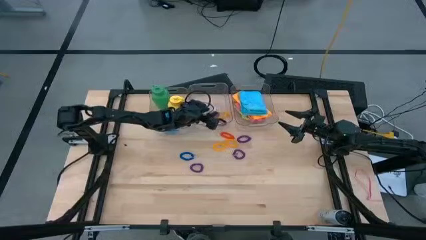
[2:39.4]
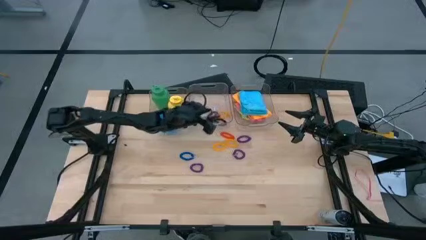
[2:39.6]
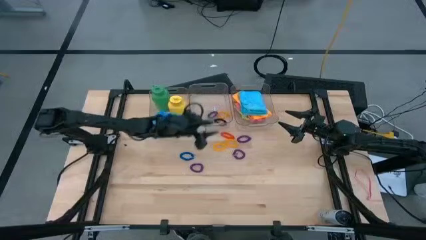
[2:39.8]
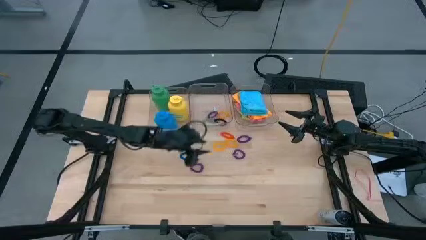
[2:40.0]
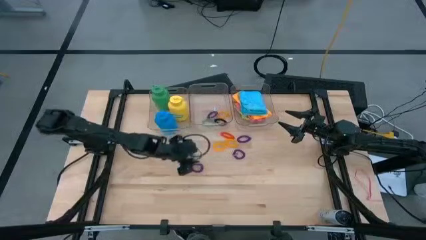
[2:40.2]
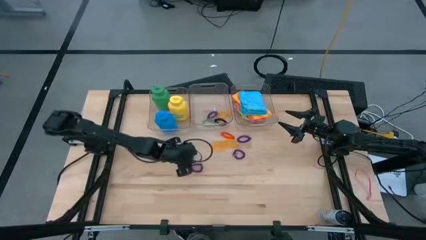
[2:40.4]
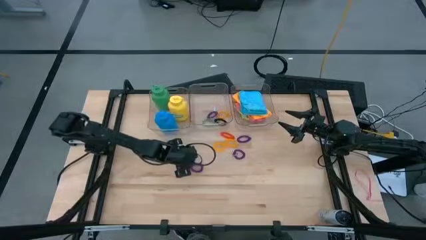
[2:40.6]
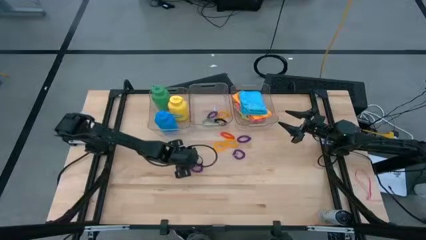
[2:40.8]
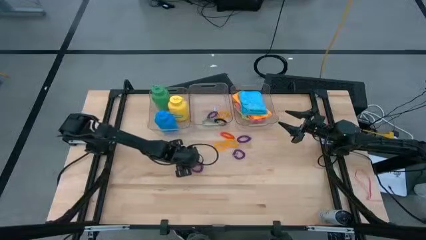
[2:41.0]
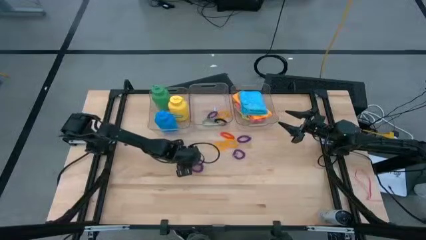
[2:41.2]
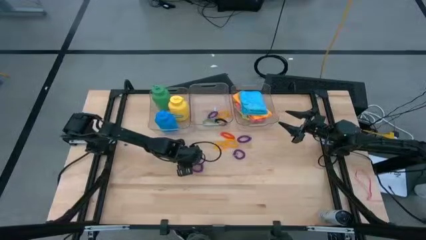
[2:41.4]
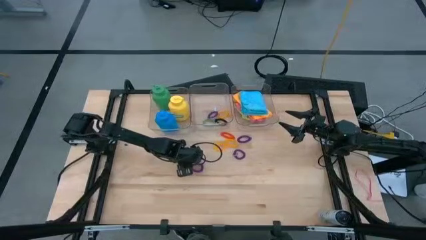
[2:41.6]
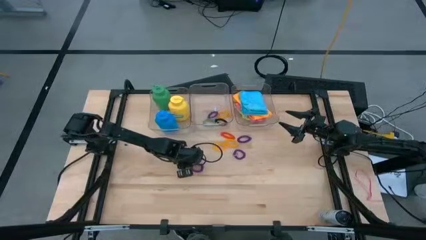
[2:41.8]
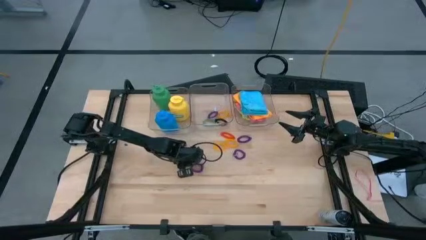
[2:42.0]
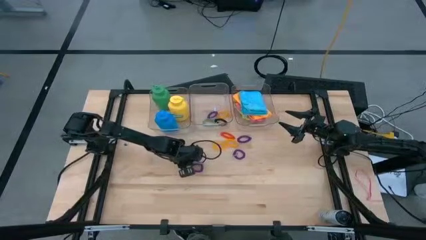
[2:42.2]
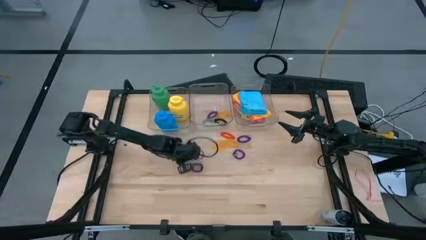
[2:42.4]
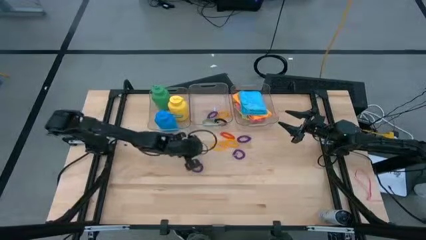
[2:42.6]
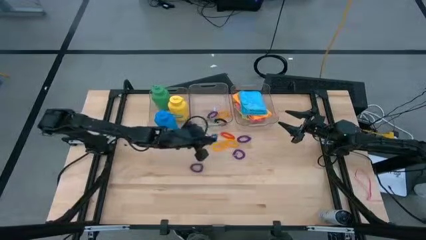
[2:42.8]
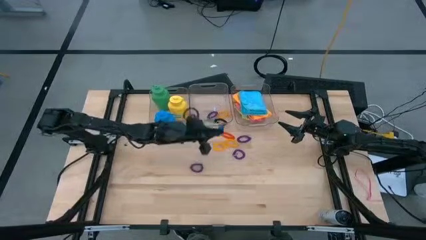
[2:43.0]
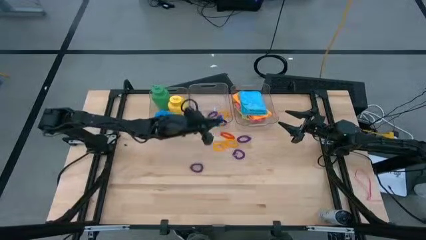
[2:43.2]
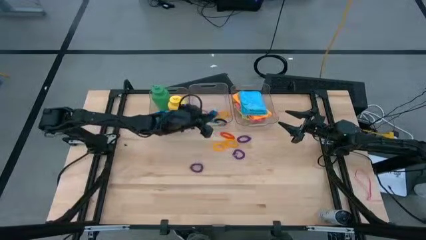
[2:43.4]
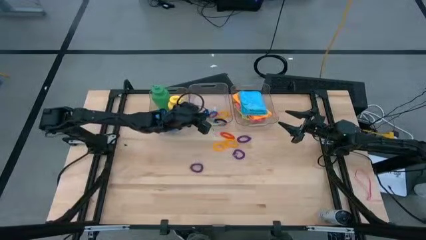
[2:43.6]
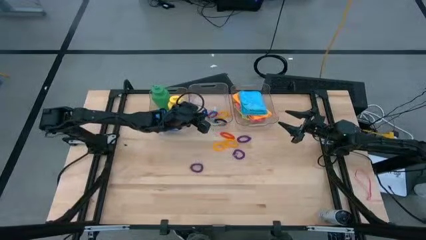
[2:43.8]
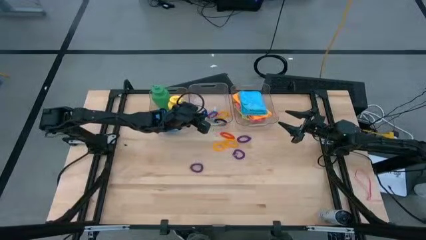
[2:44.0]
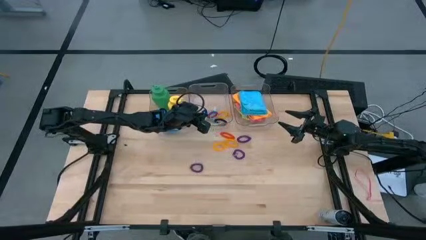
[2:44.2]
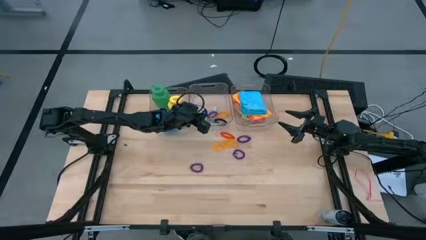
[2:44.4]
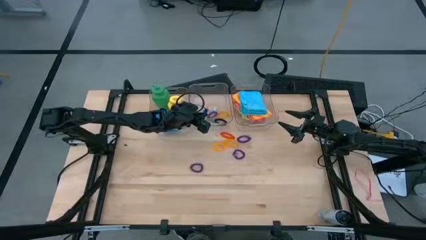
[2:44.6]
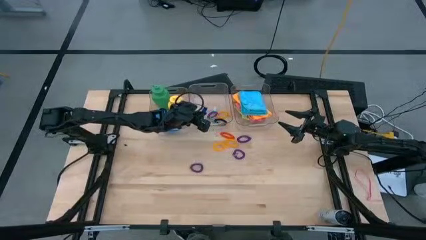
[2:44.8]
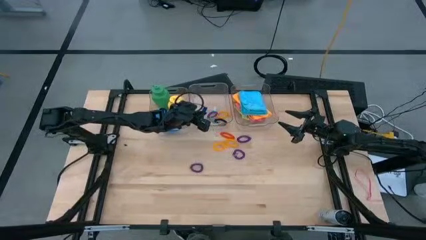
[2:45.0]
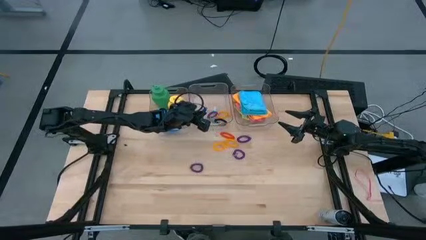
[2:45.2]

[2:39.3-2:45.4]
Task: Pick & Place Sports Items
Put the blue wrist coil into the middle transparent container

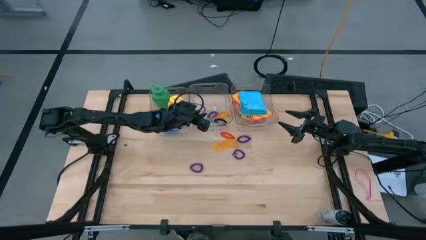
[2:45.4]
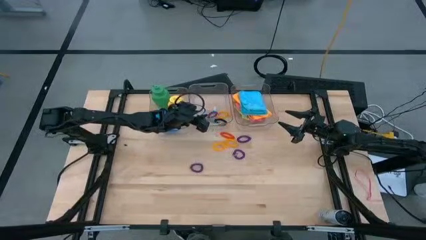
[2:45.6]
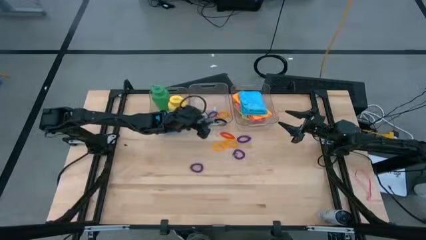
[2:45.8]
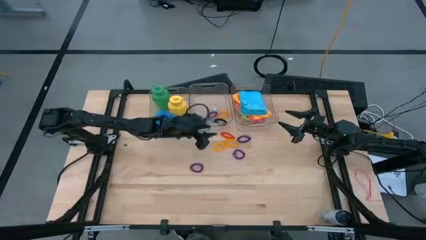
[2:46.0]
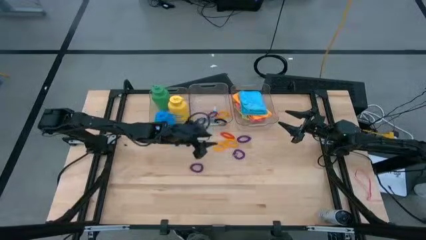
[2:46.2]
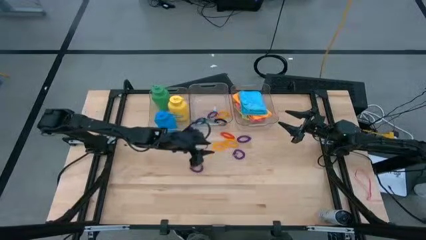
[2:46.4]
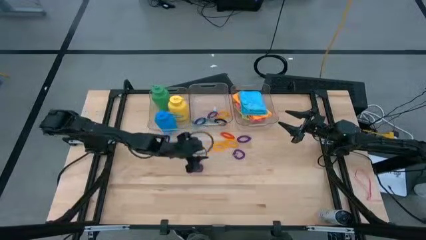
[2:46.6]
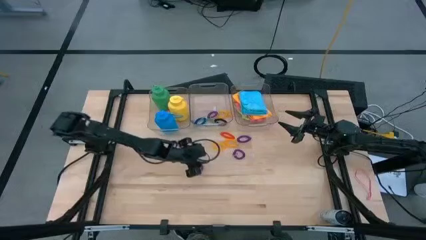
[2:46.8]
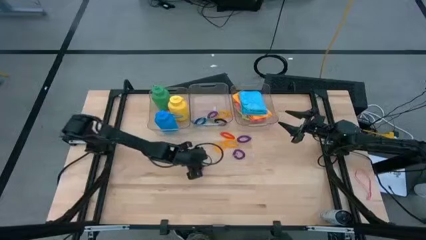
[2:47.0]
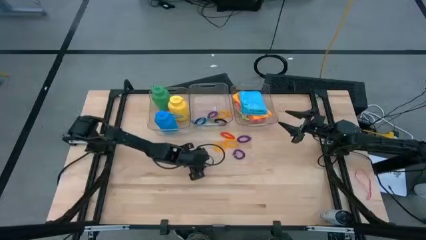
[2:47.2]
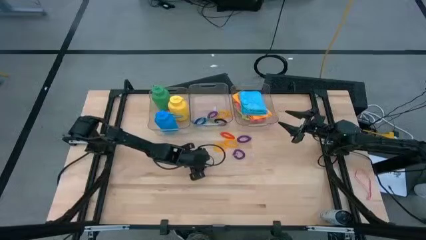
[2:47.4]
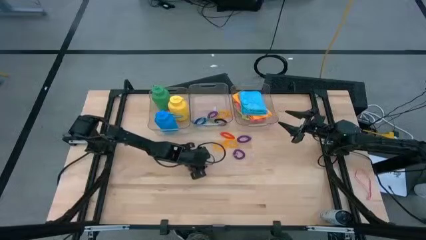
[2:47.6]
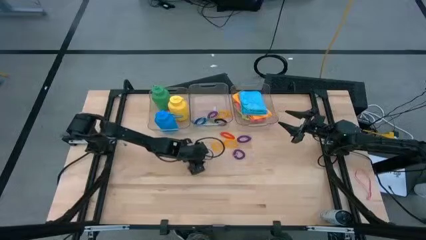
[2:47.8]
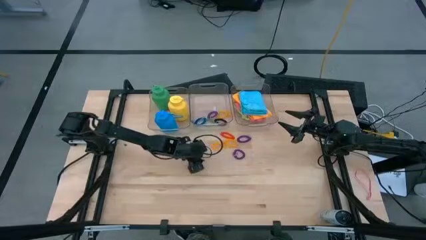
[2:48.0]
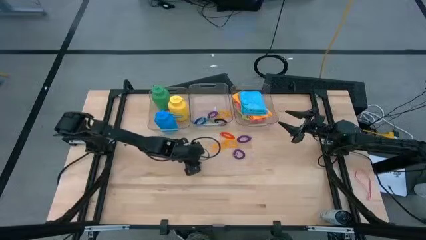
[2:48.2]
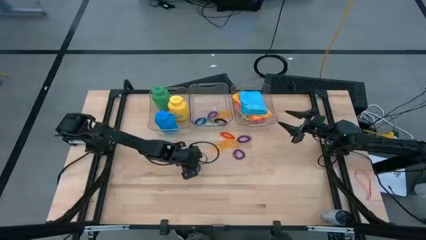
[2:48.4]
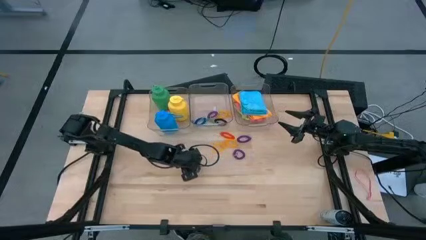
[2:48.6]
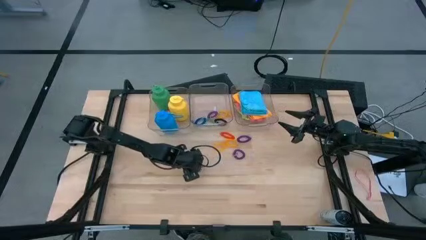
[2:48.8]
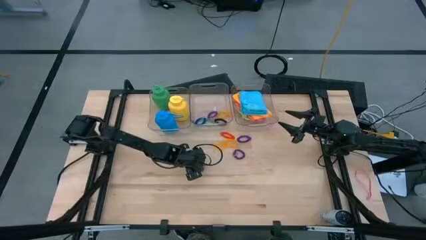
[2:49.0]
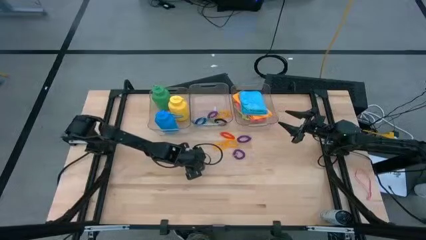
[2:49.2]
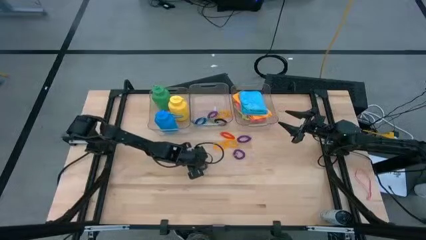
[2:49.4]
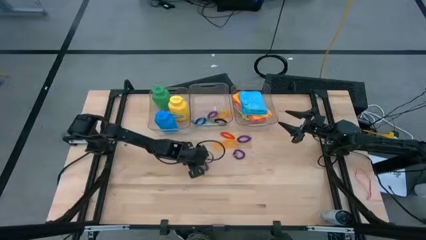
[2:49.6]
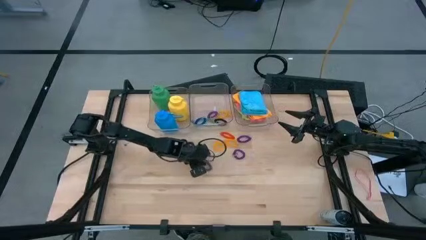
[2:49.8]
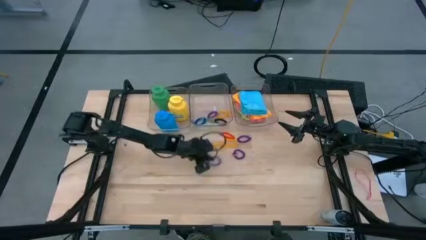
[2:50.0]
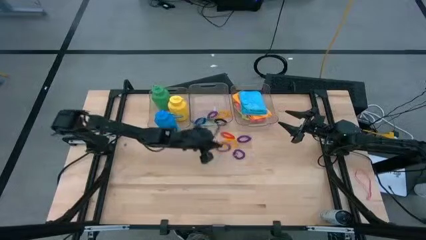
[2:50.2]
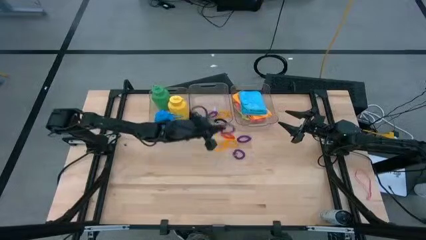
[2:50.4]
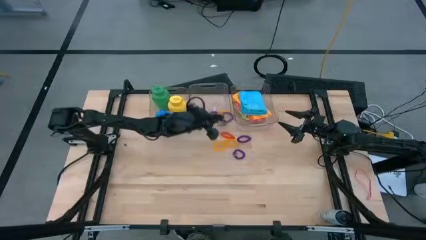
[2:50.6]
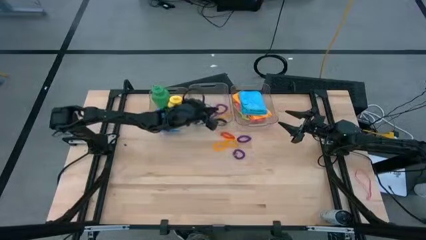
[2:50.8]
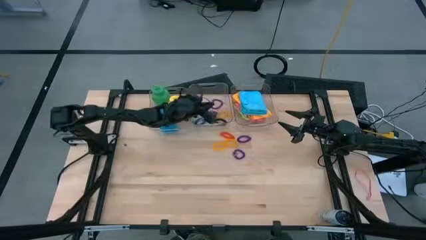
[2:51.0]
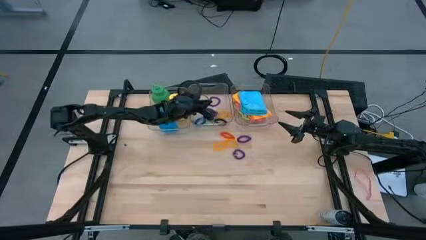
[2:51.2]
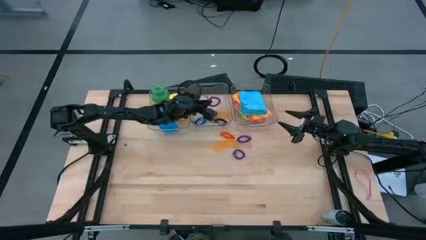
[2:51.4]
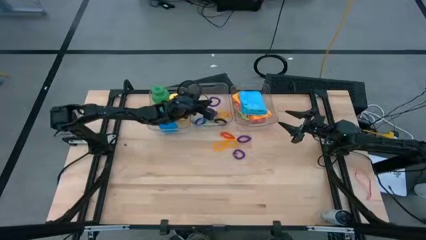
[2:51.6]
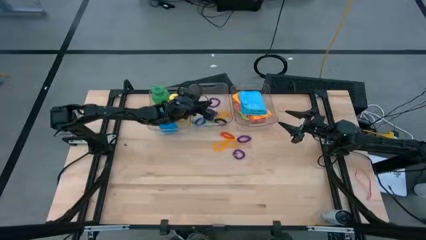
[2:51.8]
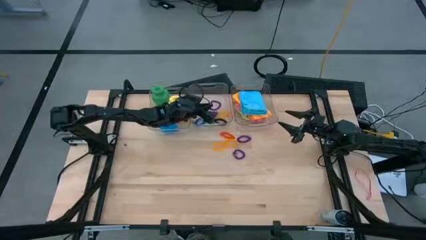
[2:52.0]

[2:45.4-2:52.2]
Put the purple wrist coil into the middle transparent container

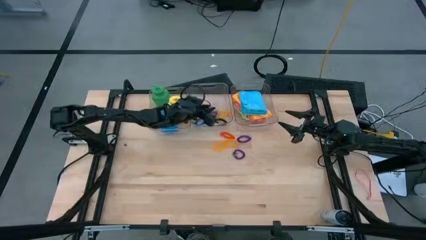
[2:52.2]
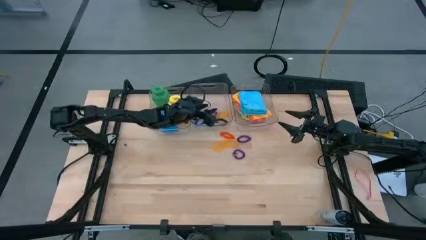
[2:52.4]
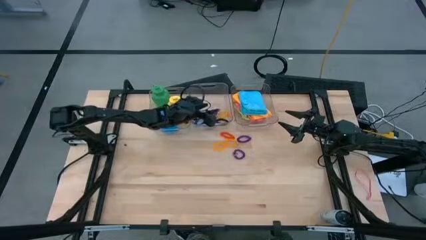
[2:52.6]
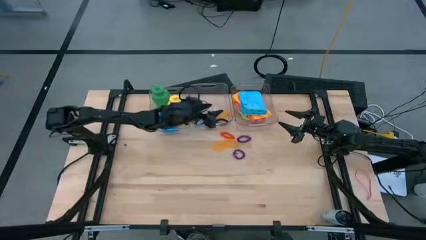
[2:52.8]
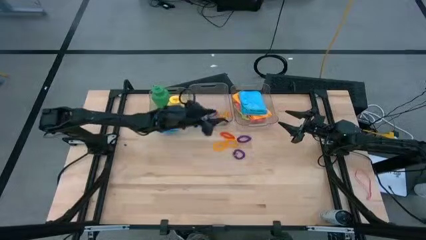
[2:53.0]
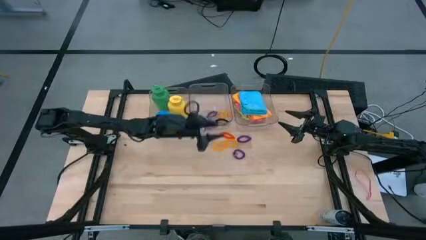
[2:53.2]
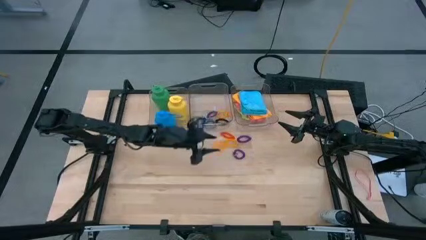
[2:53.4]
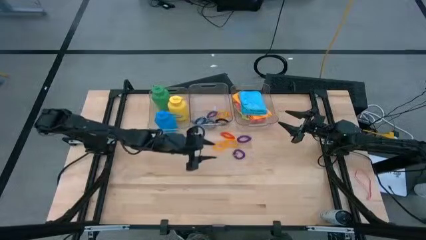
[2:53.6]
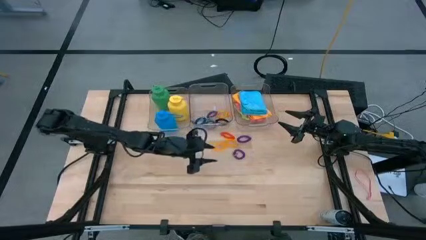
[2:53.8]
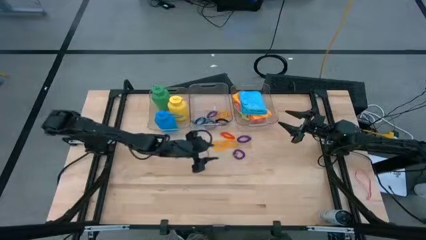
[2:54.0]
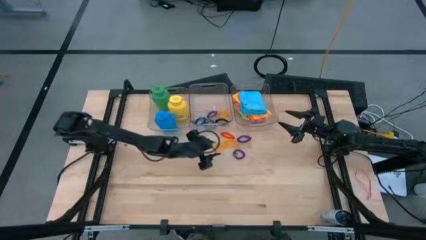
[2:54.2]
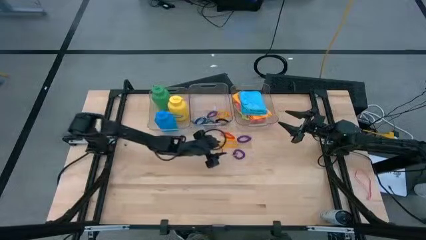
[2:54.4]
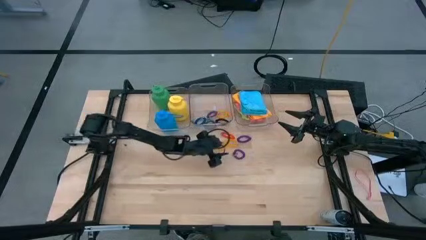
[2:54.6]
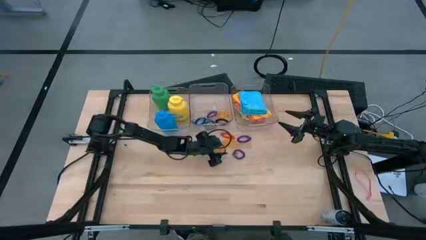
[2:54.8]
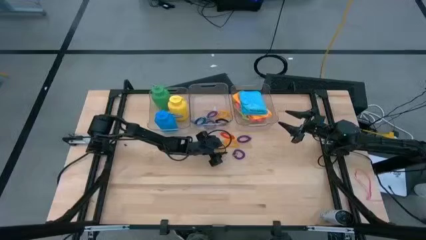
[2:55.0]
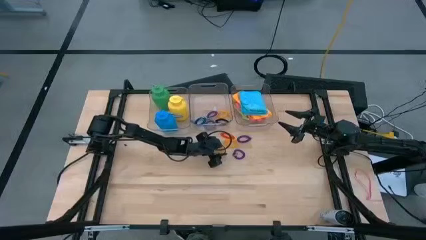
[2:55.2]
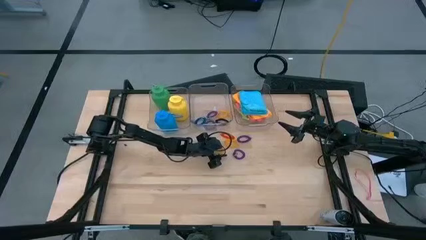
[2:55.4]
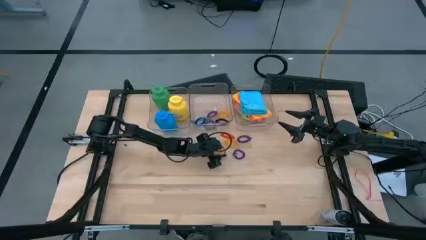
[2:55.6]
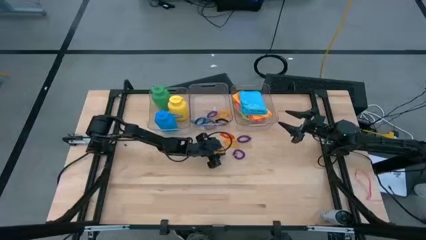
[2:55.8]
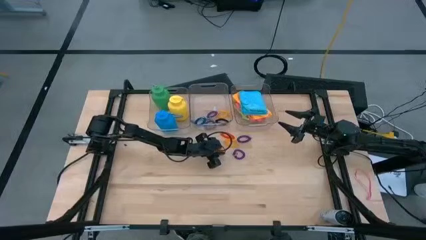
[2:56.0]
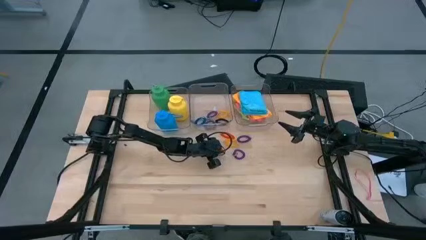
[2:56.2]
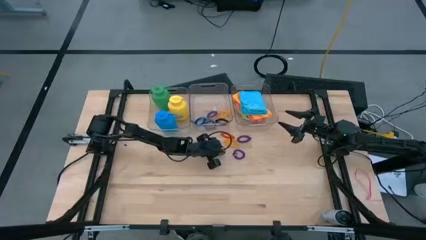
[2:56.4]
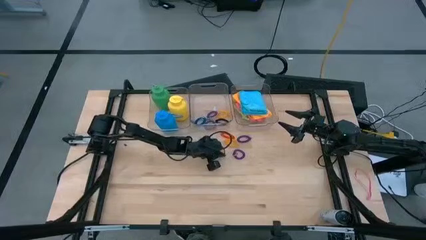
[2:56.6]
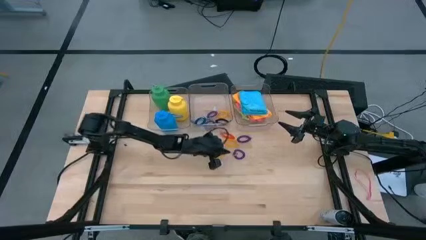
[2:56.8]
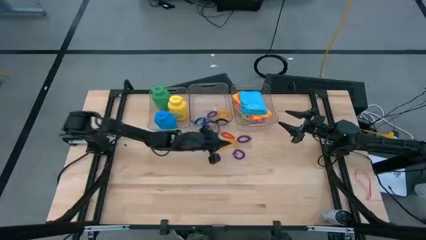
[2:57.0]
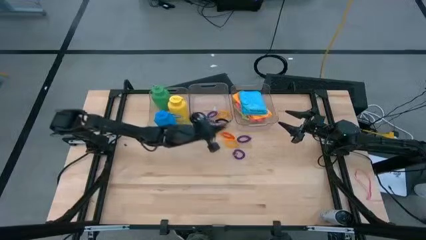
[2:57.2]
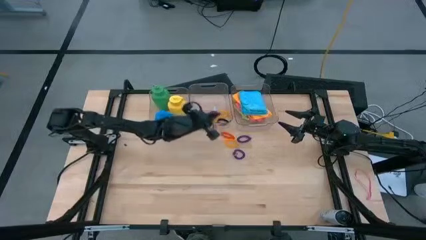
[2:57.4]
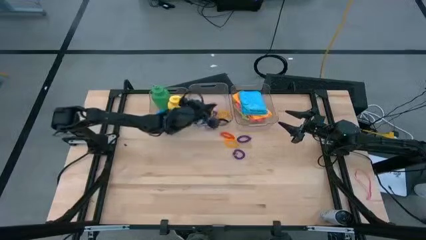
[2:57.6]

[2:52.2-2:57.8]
Put the yellow wrist coil into the middle transparent container
